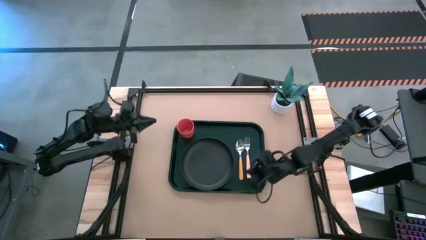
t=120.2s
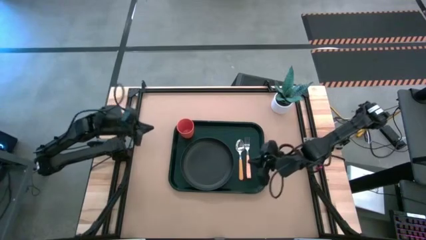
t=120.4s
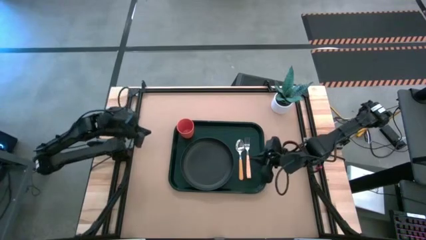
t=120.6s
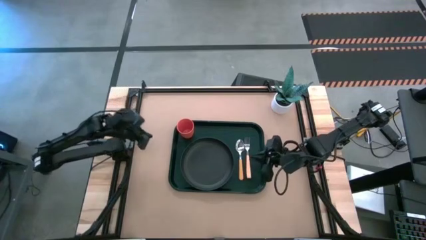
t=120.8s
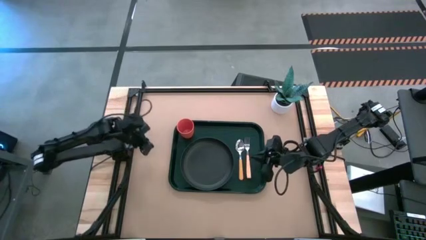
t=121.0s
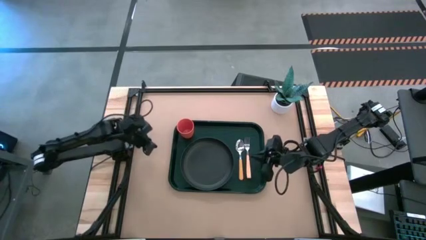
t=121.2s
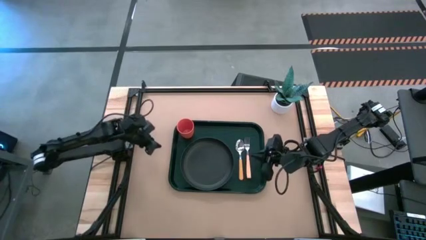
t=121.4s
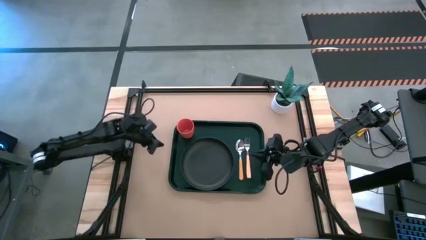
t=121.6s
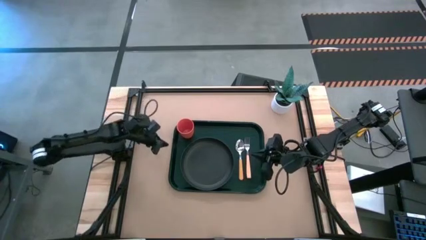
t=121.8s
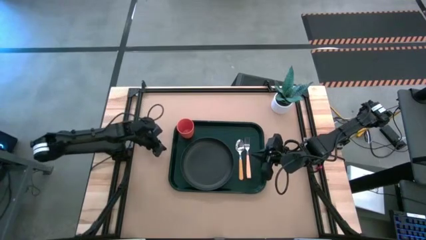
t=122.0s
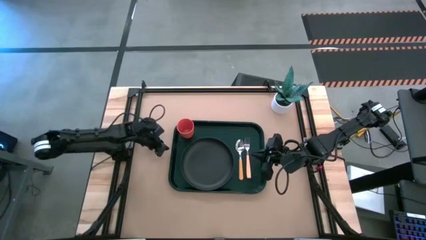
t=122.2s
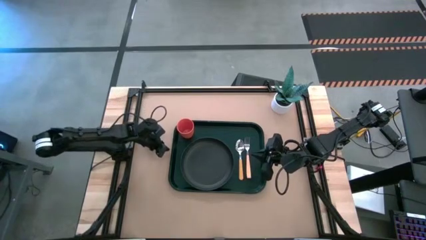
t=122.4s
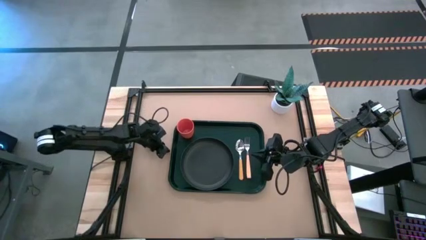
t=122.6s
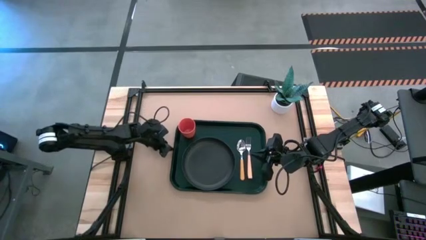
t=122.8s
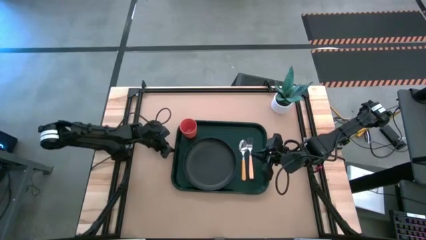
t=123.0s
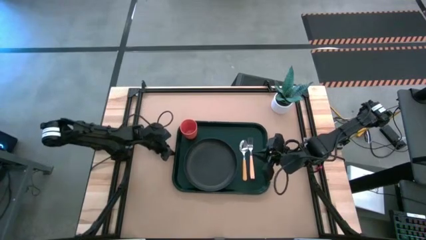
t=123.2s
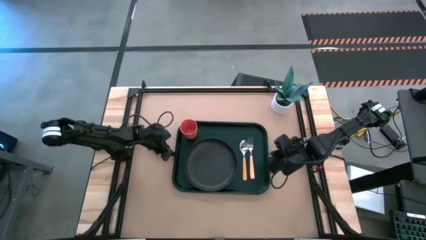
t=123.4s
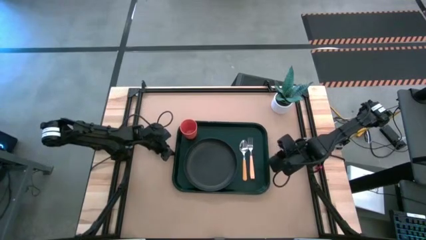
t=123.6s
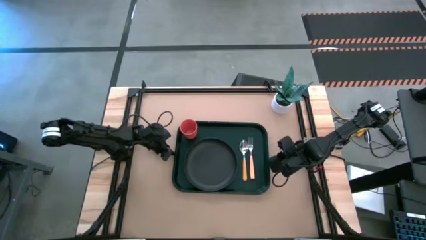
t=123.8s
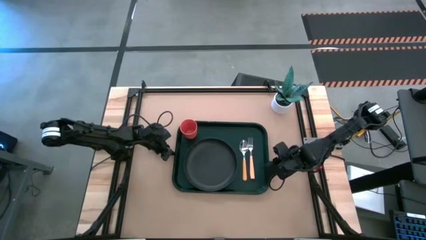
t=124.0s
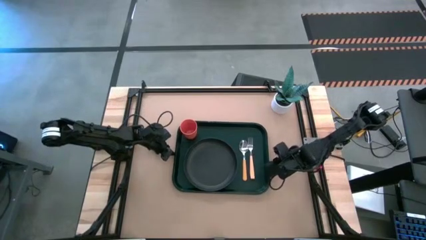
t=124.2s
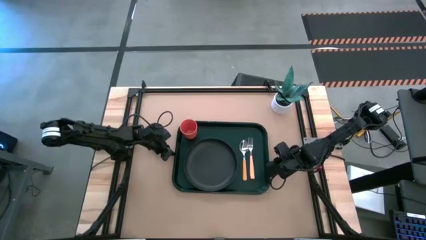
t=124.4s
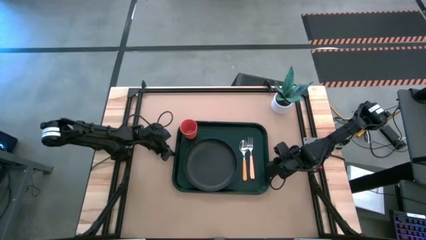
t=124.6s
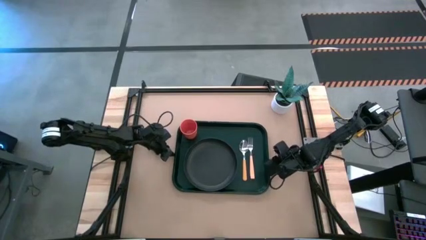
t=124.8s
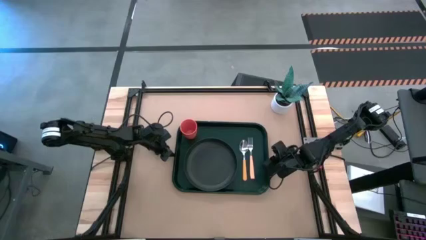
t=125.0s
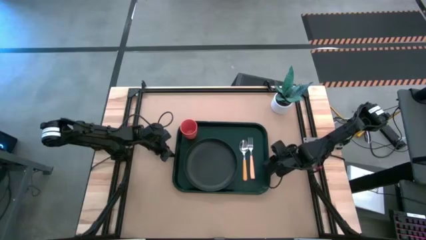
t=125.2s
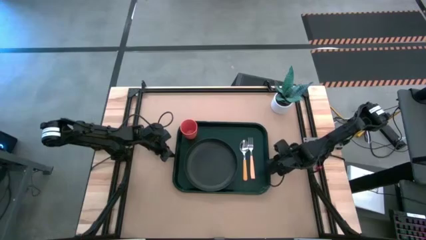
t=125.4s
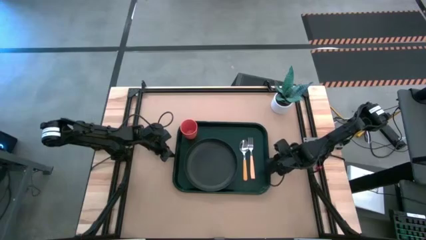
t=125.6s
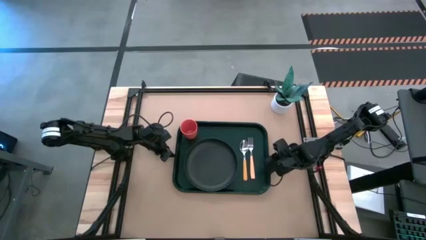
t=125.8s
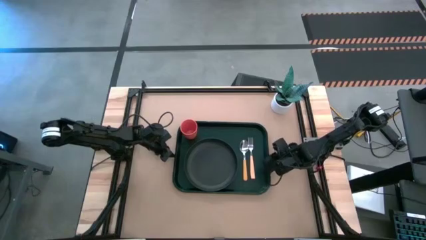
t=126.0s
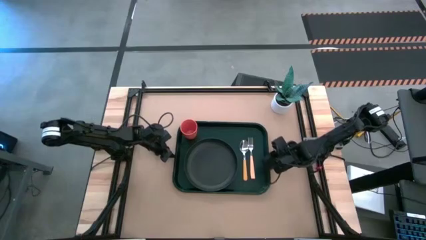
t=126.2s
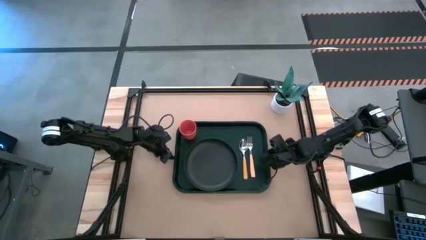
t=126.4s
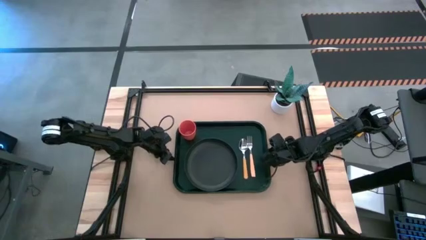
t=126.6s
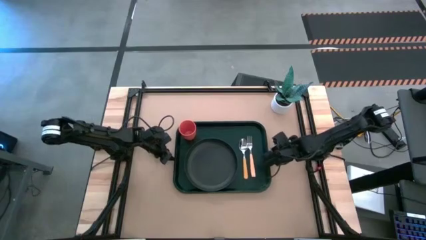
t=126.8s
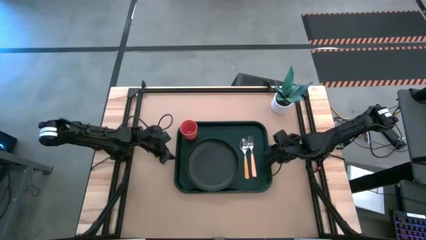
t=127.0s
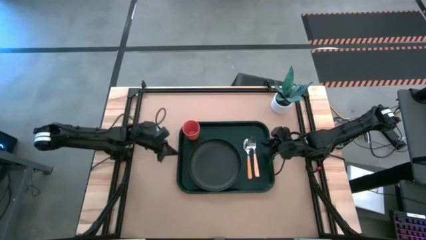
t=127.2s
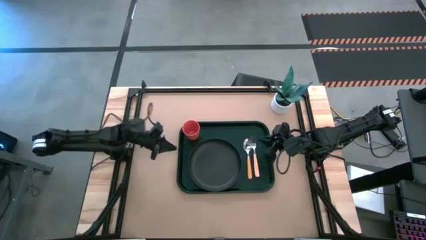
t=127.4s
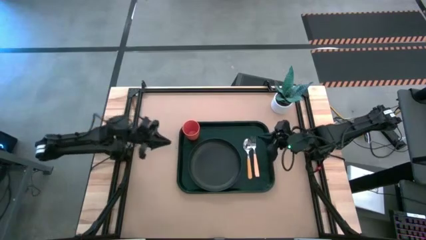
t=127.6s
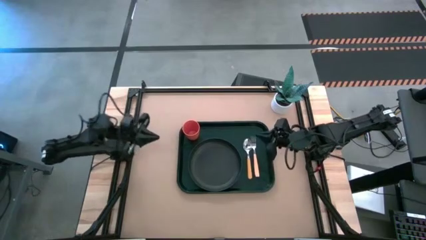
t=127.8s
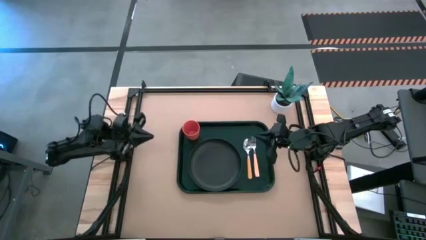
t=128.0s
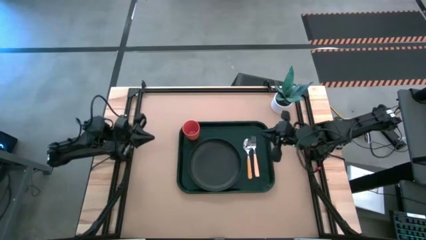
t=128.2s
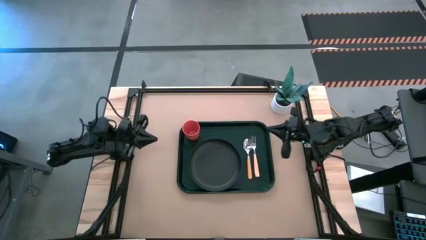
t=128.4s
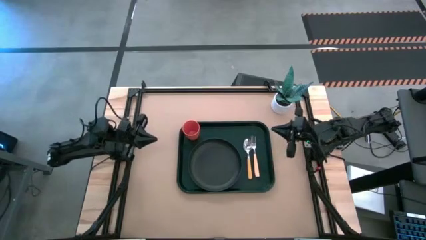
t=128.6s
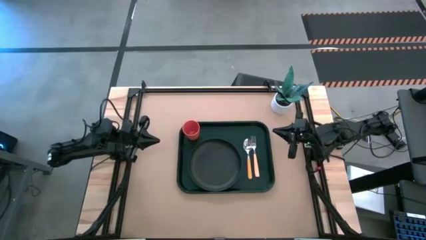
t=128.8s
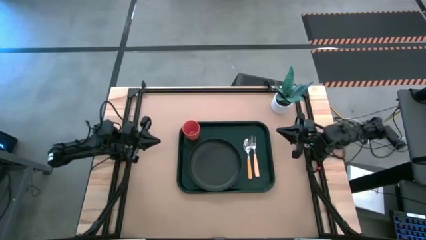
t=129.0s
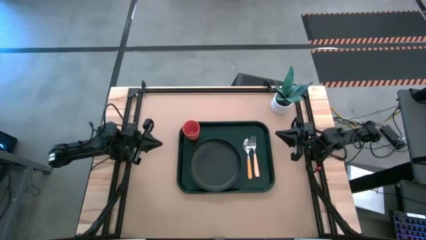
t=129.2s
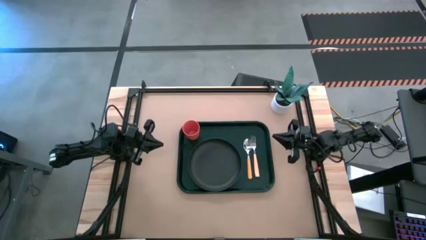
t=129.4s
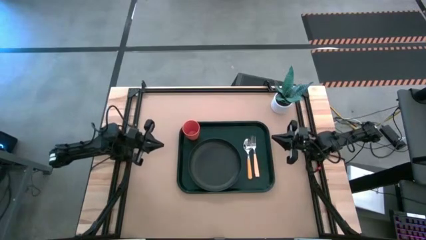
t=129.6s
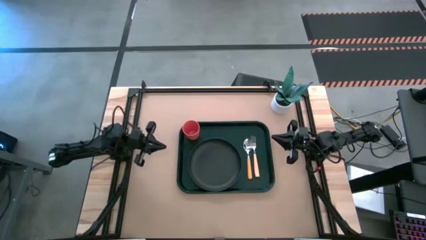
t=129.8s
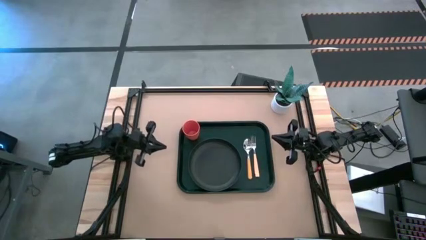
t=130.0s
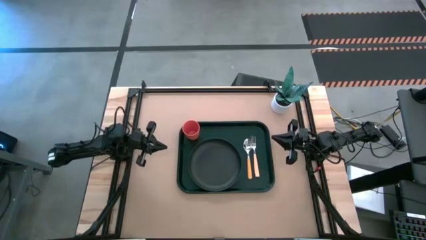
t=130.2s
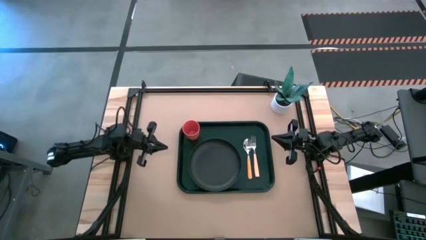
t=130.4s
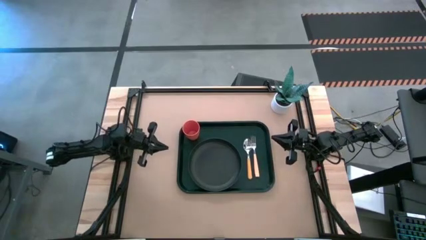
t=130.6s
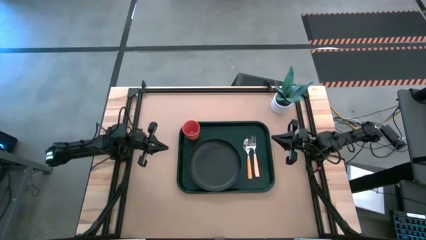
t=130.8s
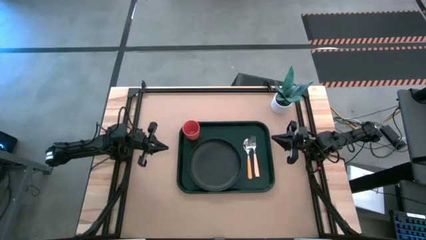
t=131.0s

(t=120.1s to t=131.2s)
Task: Pick and place plate/cup/fork/spoon on tray
Adjust the black serving tray

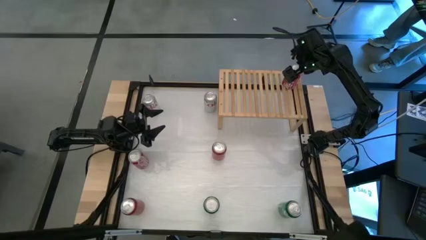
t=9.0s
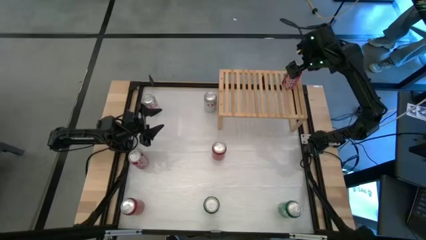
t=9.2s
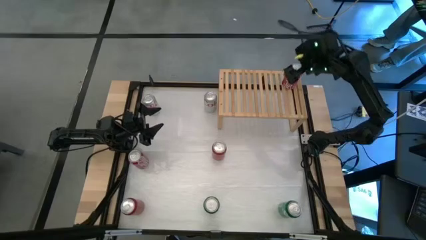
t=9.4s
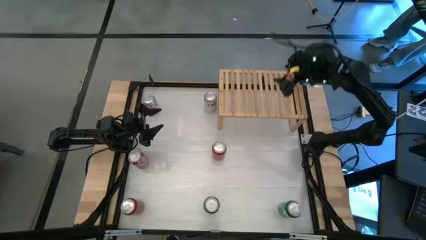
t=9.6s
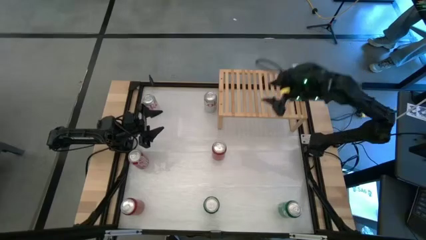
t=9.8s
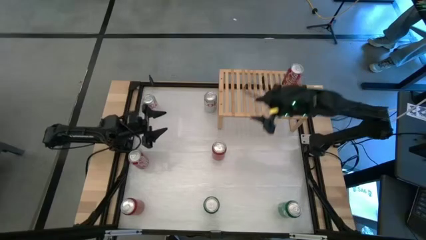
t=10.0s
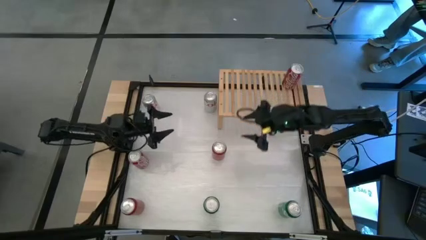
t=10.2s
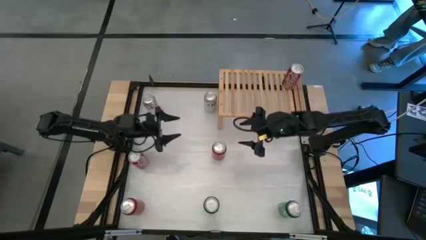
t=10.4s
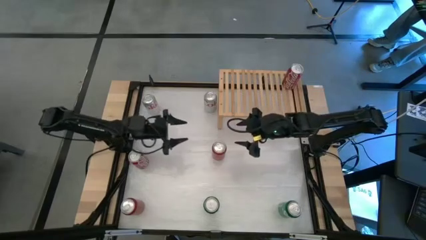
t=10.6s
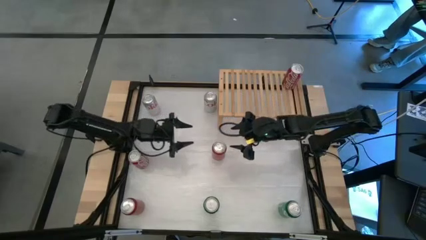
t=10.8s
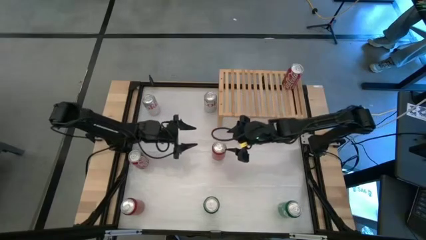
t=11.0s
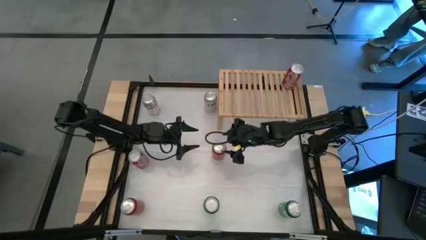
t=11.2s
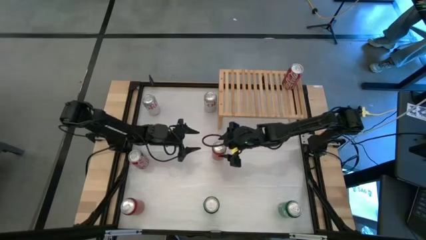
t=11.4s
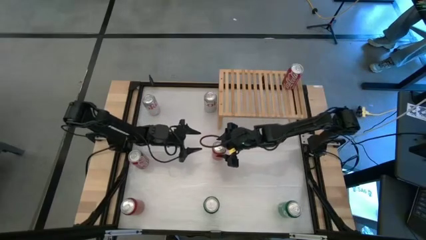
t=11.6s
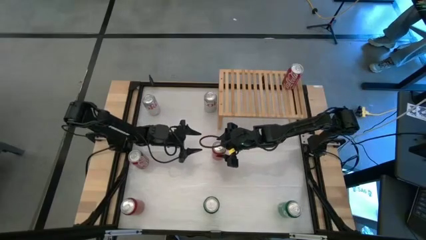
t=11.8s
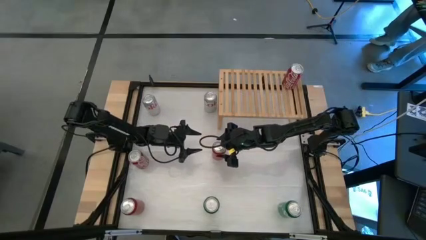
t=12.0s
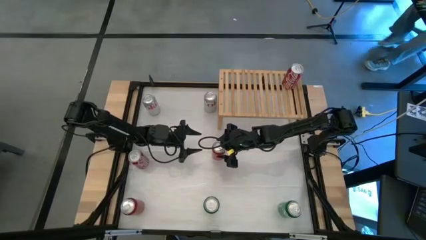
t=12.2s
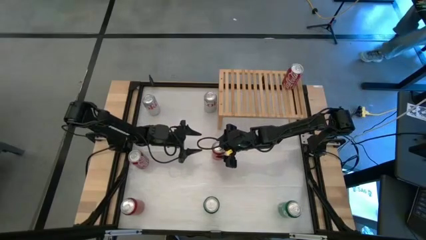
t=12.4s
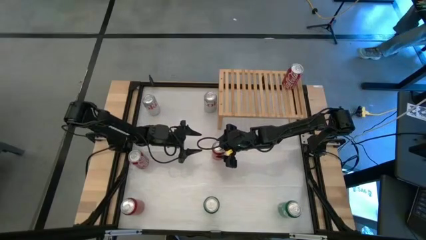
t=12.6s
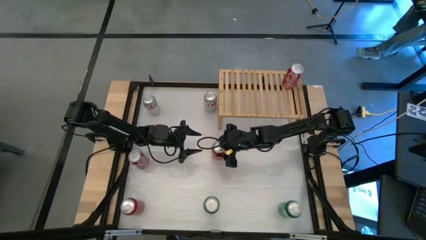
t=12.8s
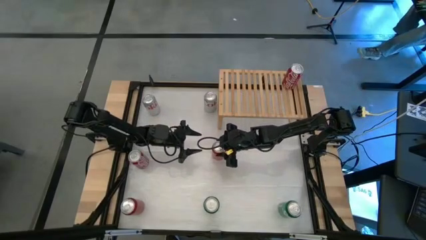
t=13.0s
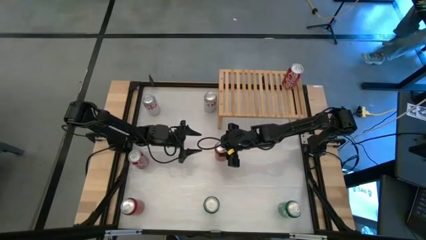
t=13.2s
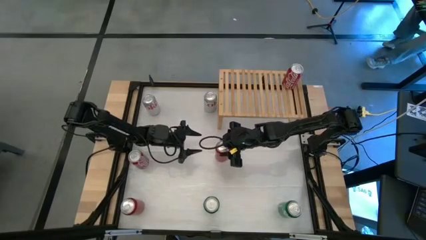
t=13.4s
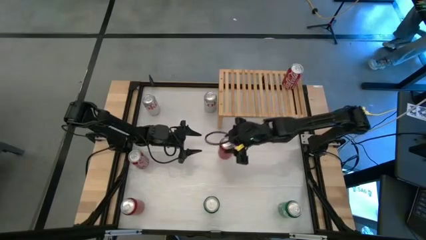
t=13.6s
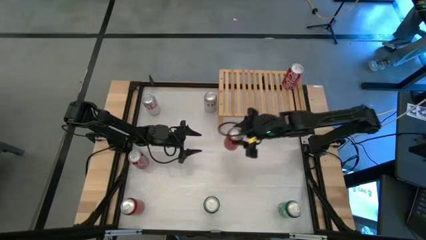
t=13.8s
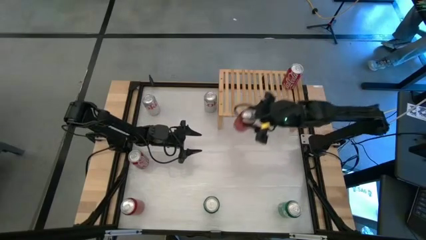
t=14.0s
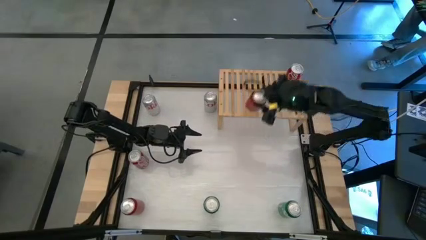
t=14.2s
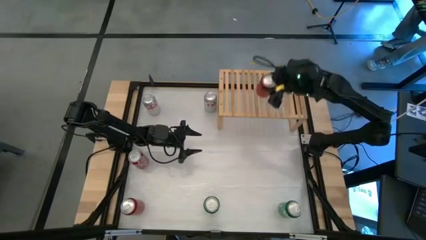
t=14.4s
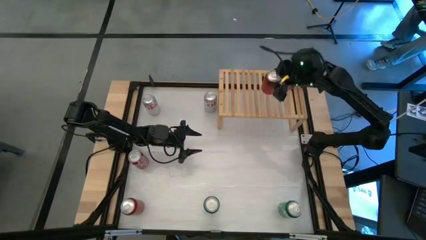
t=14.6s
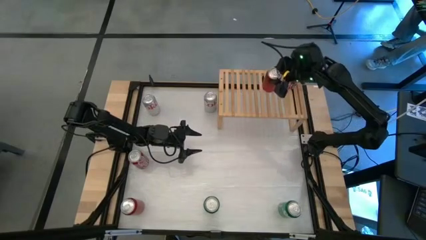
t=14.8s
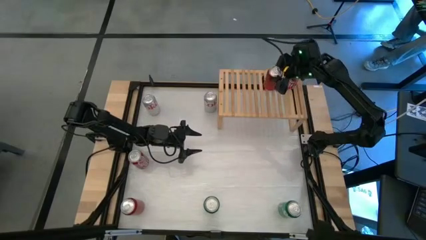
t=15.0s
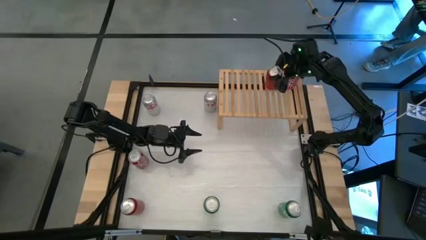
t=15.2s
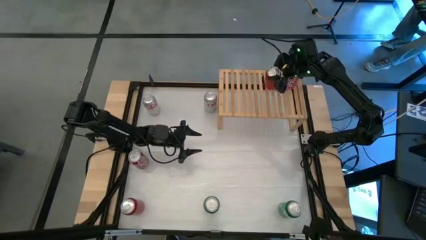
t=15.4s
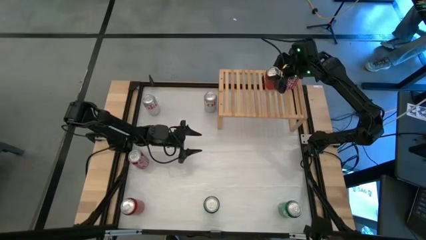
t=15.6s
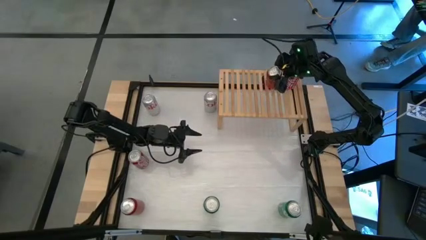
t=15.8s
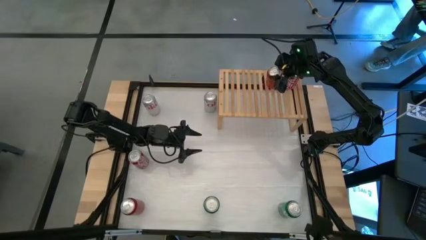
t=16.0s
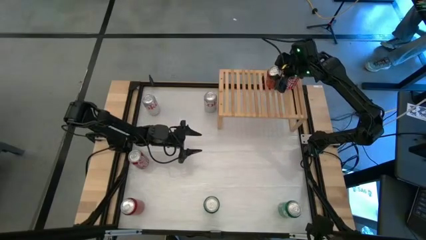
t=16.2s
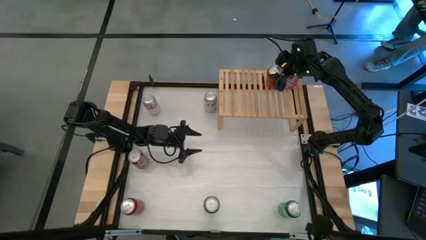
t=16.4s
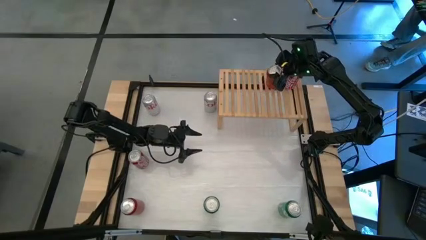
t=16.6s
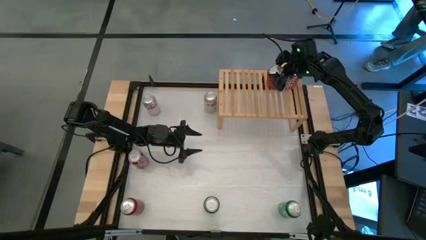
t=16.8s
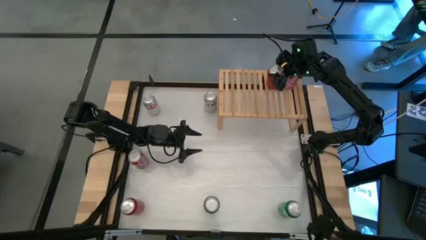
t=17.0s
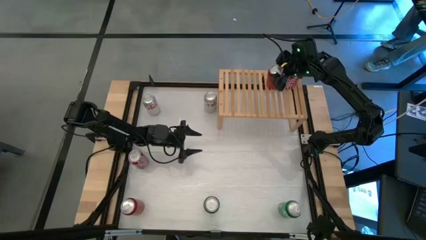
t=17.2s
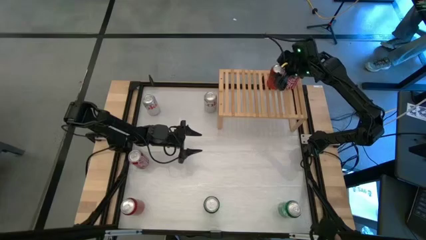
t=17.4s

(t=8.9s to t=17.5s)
Task: Place canned beverage on shelf
Put the right red black soda on the shelf
